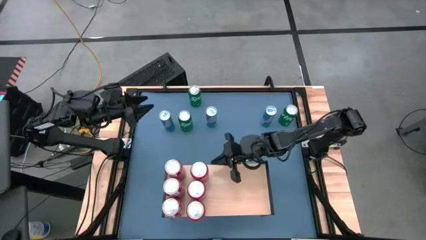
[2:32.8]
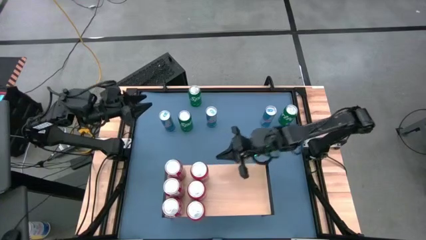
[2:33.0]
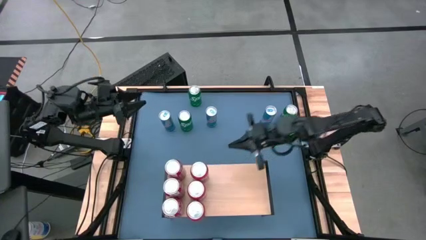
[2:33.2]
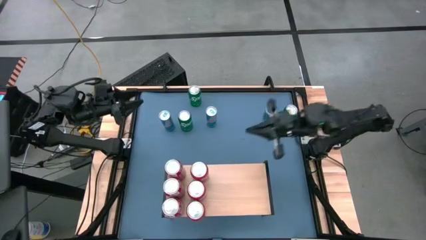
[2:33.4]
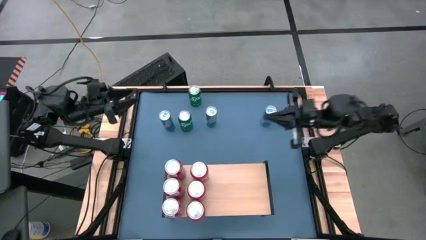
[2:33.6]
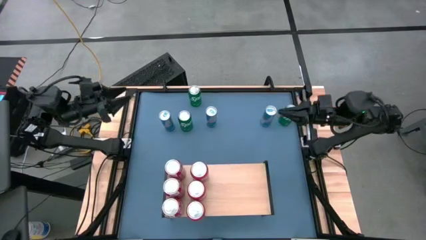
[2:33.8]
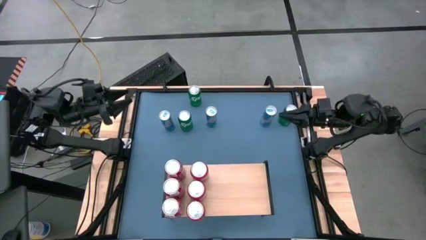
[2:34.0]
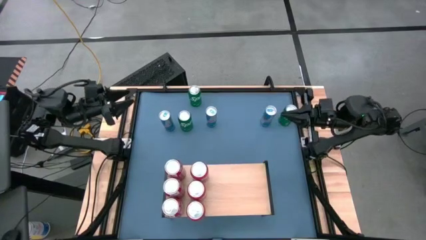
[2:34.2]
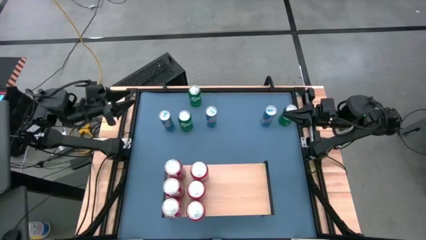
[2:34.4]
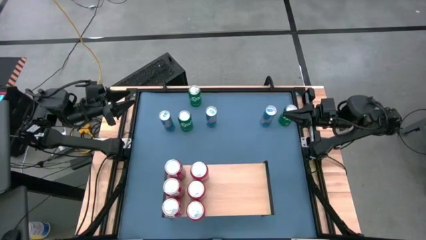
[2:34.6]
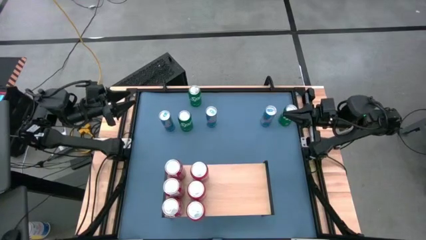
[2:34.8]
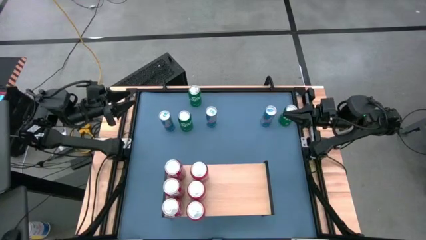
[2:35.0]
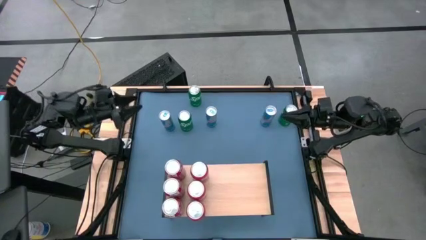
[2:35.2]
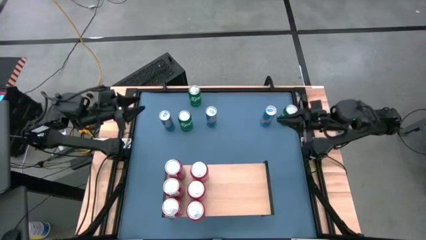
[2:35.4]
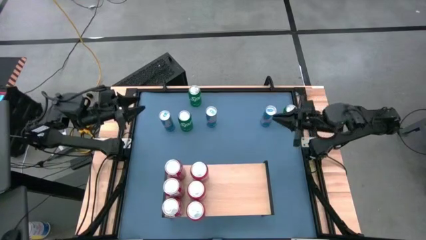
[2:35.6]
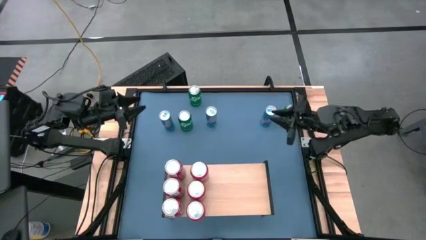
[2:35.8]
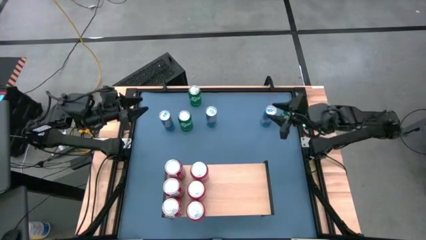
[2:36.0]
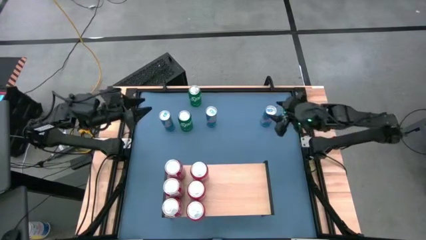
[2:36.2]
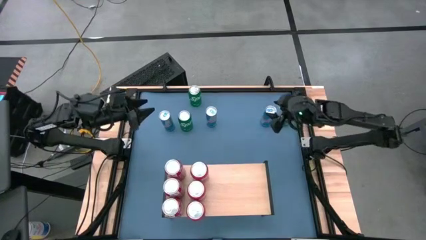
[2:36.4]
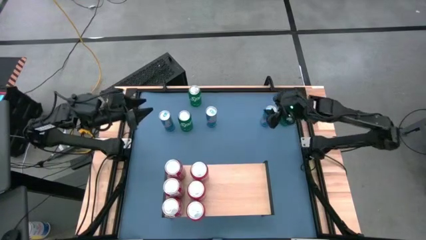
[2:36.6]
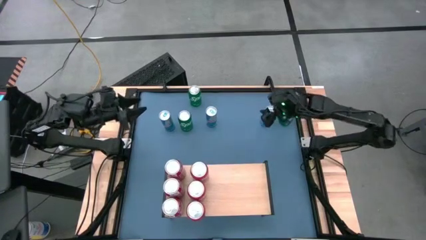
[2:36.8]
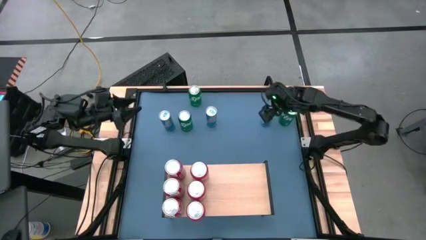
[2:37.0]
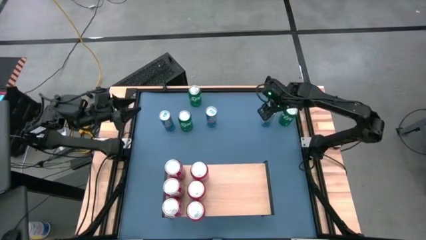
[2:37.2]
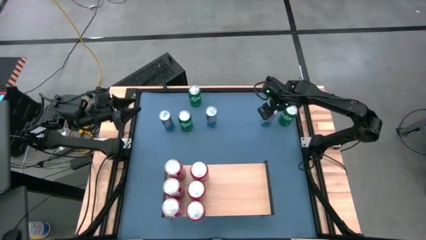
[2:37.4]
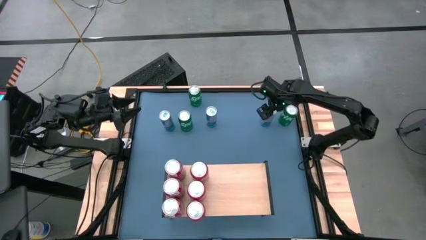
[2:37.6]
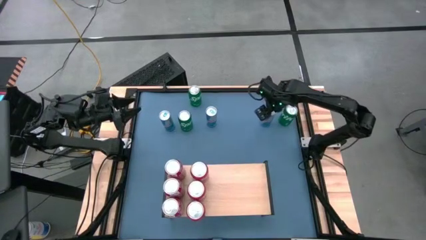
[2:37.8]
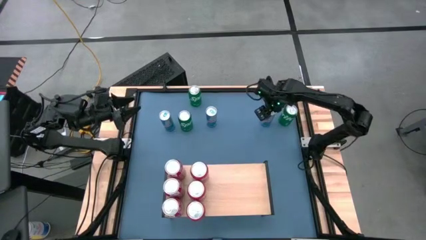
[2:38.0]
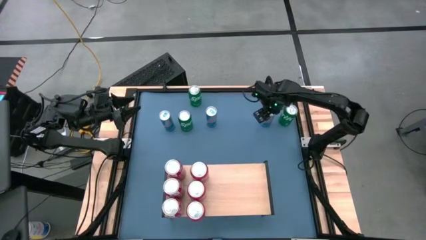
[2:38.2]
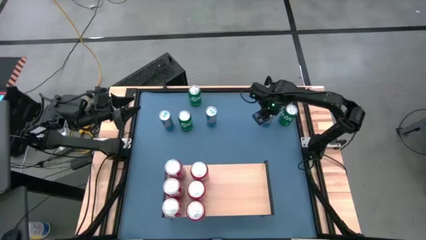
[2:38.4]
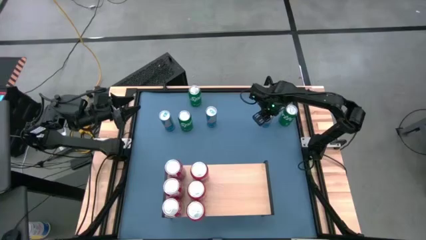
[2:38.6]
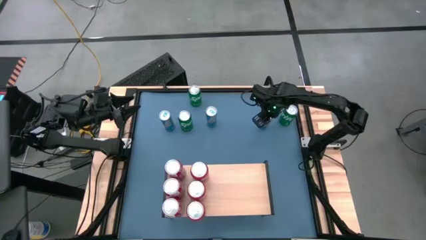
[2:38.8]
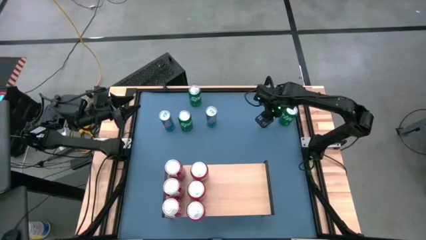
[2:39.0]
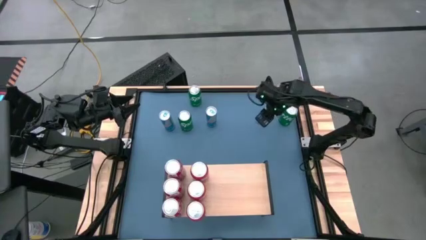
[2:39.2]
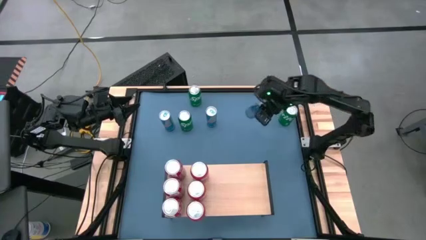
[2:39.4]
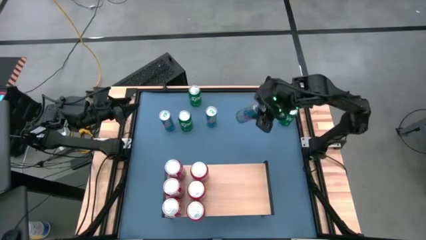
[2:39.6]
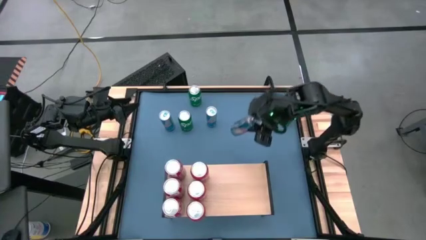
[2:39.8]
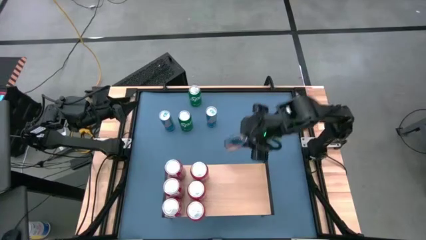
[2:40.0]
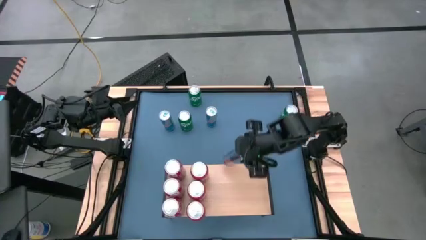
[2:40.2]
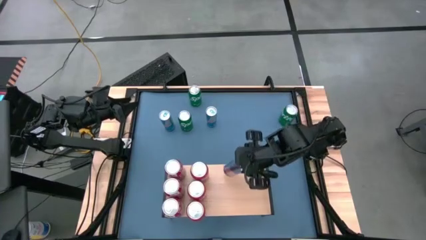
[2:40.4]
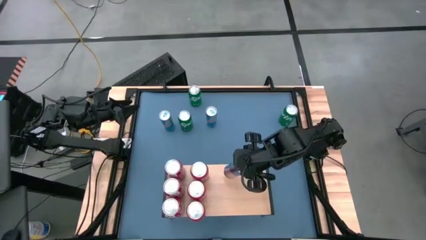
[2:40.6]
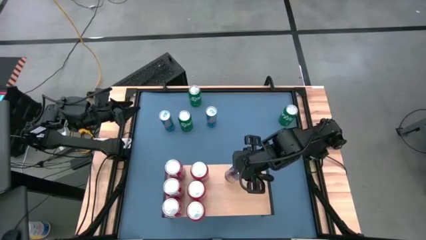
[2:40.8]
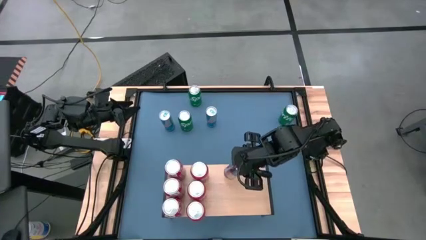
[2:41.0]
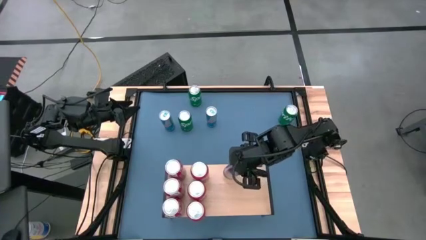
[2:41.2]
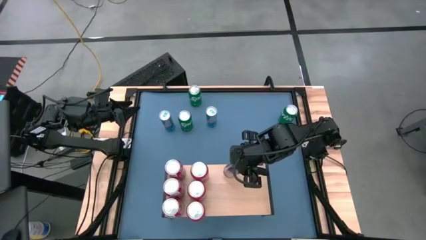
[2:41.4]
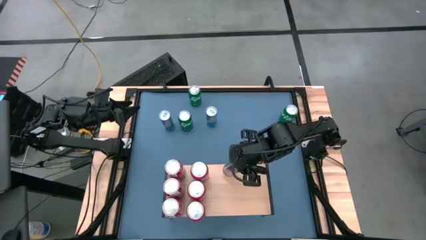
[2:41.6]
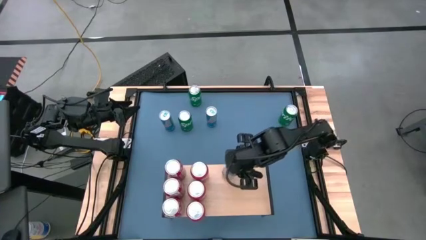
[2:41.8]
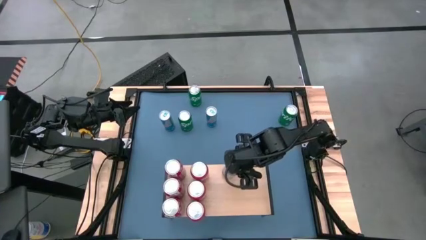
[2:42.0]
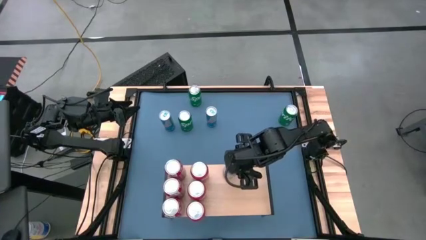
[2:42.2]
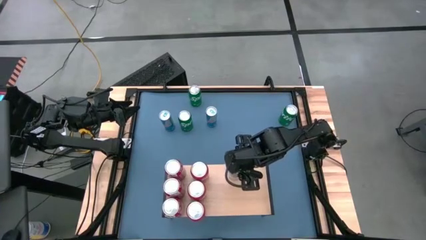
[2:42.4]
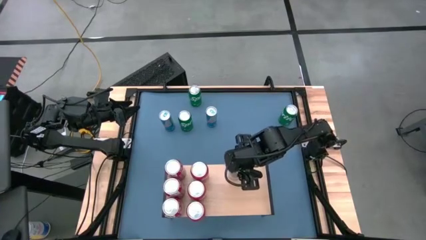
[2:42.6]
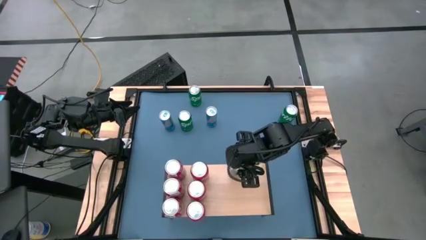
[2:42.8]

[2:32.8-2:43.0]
Task: Place canned beverage on shelf
Put the right blue soda can on the shelf
